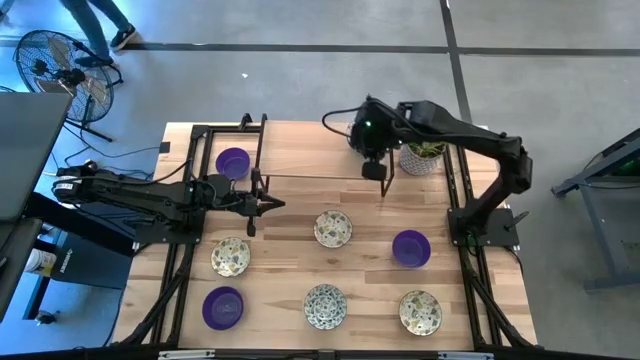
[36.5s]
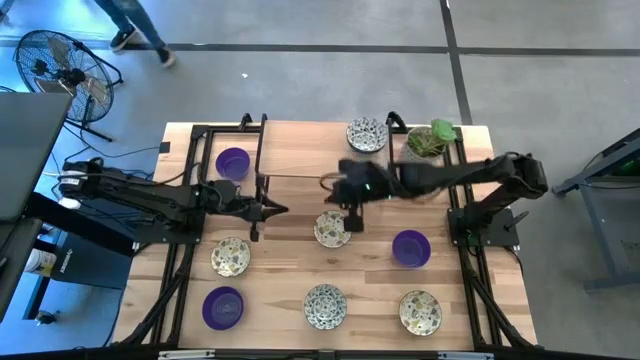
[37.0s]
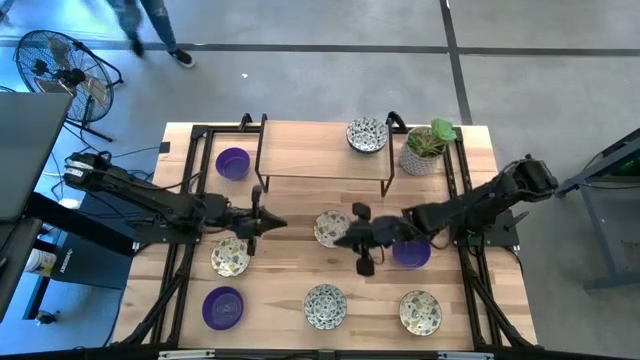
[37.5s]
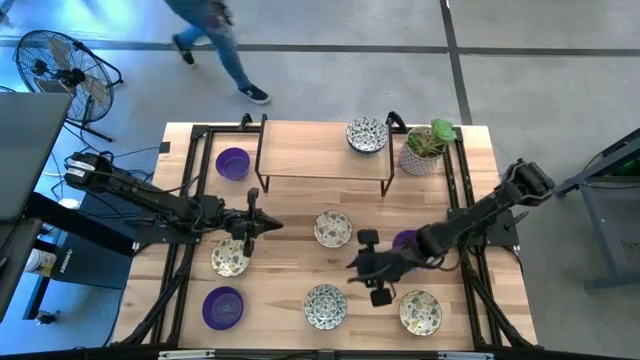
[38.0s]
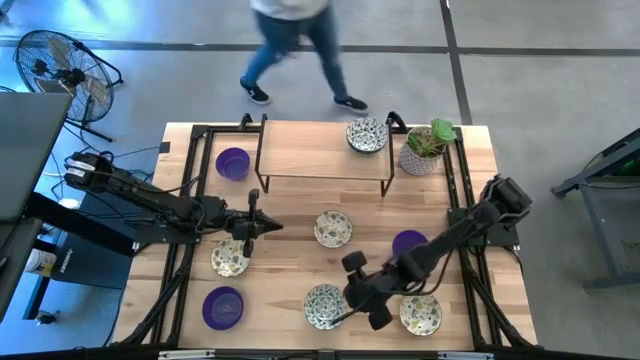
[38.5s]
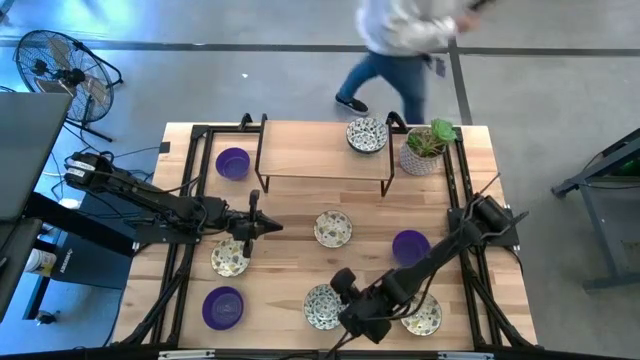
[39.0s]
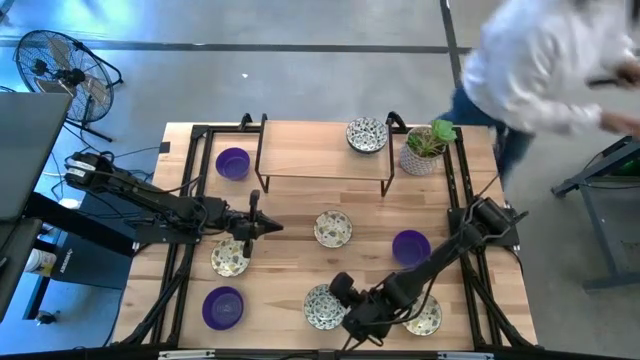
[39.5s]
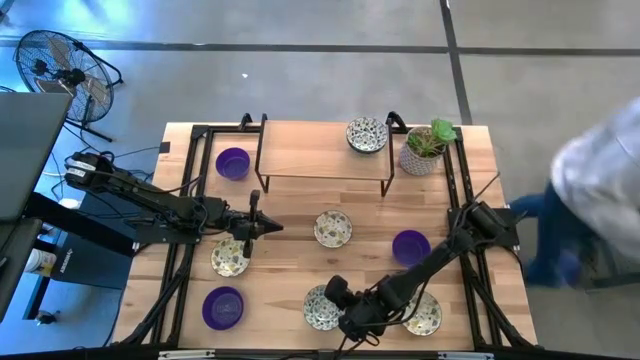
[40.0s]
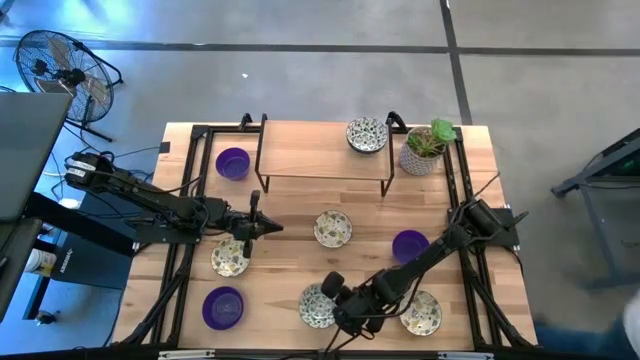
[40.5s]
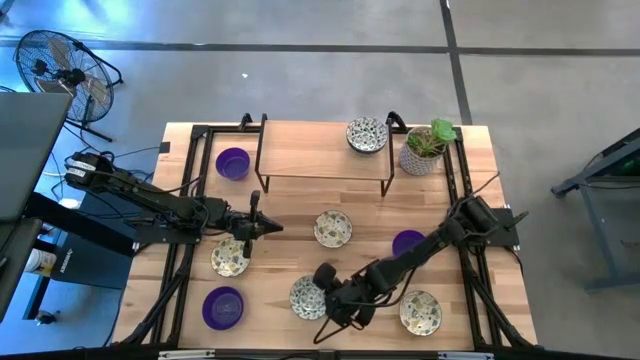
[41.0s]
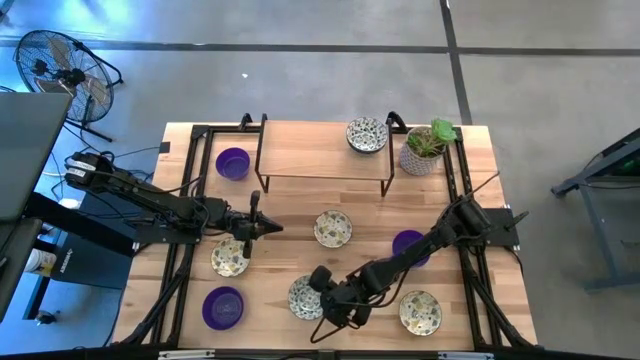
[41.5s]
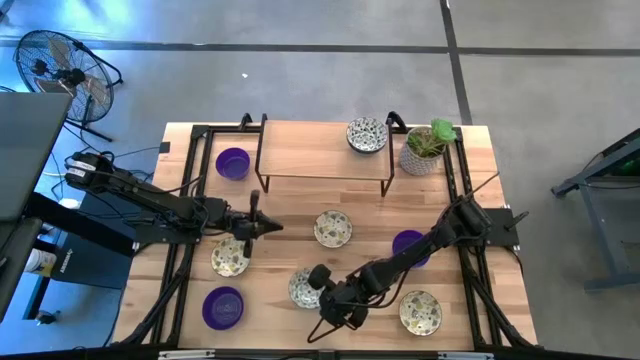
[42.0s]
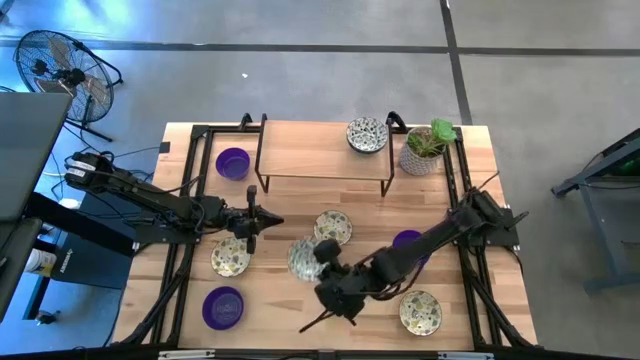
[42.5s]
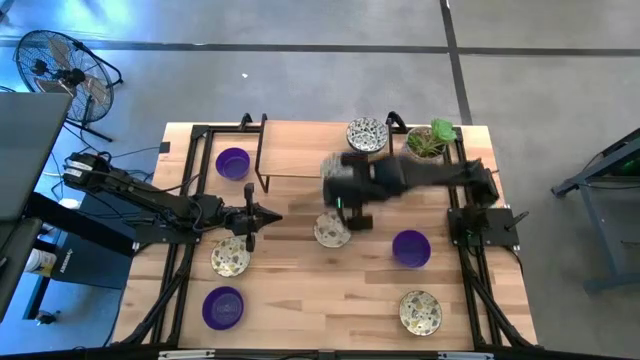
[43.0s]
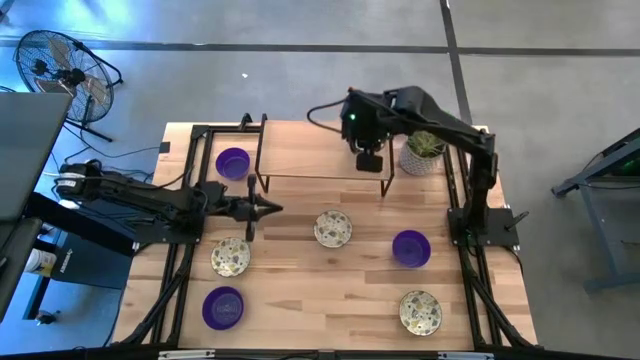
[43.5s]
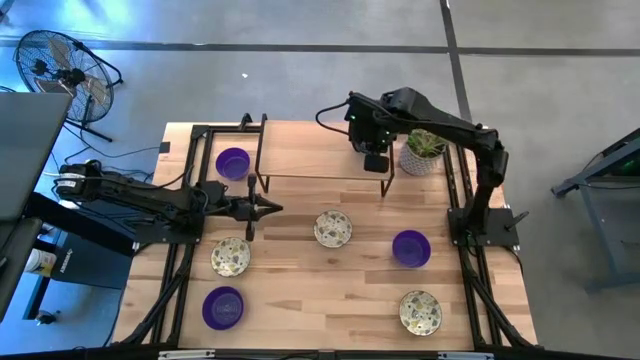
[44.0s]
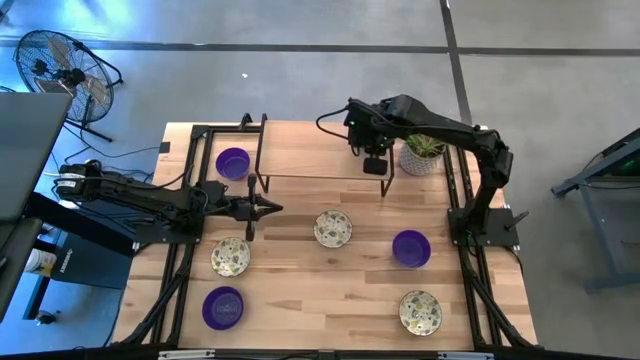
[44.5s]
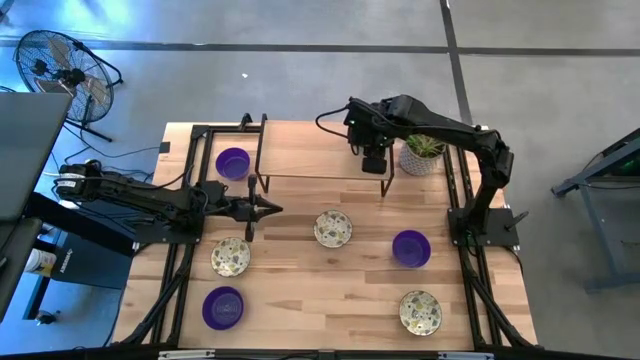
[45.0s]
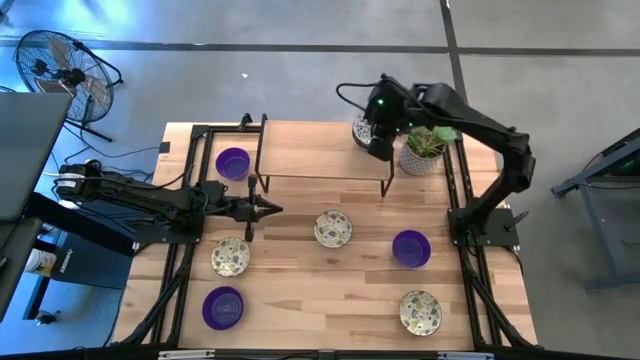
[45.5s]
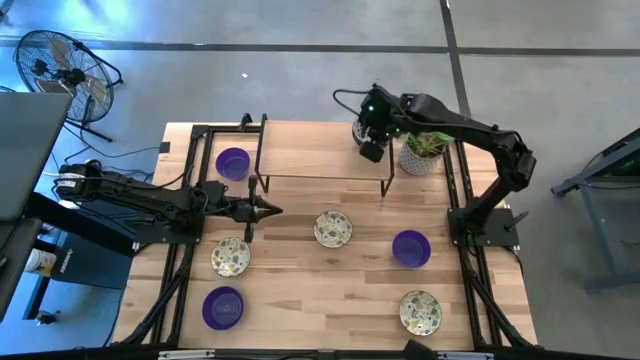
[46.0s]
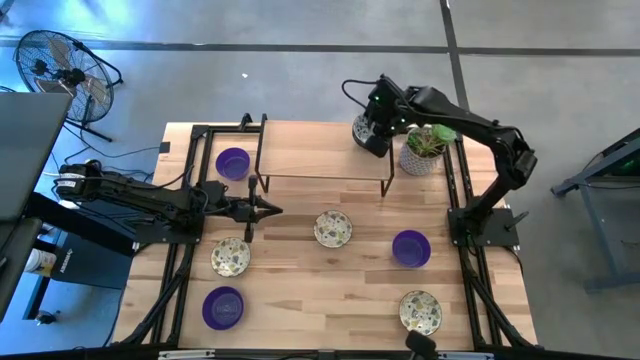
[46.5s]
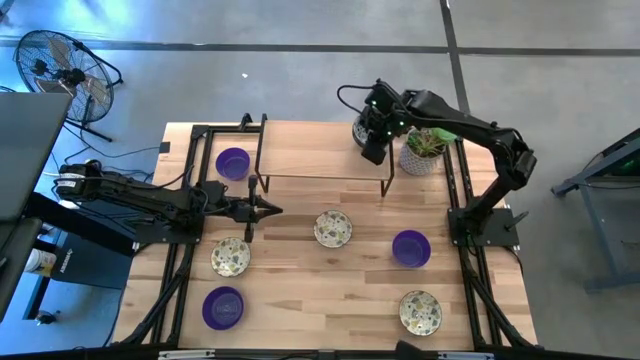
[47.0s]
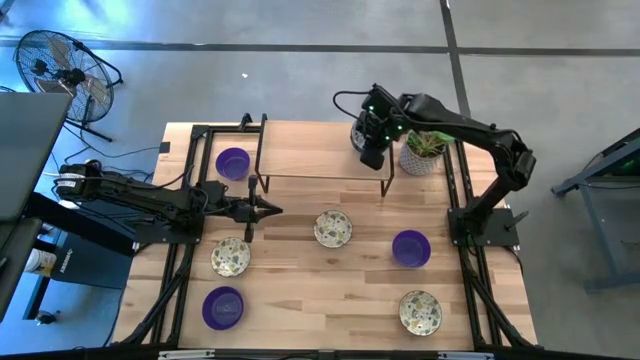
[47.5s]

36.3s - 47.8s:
Task: Pick & Place Mini bowls
Stack the blue patterned bowl on the blue bowl on the shelf

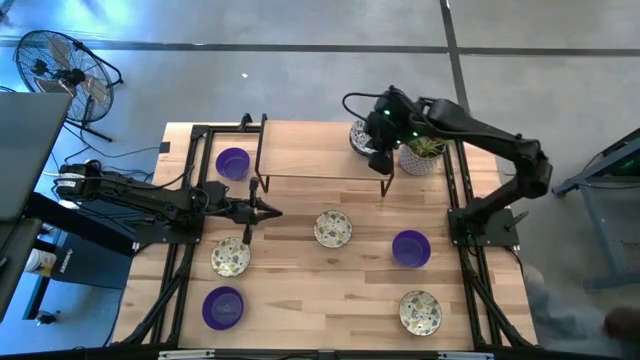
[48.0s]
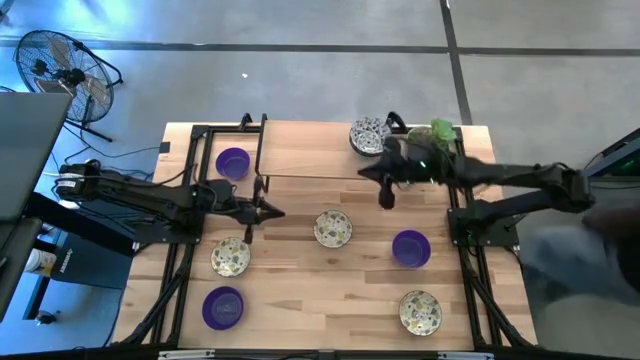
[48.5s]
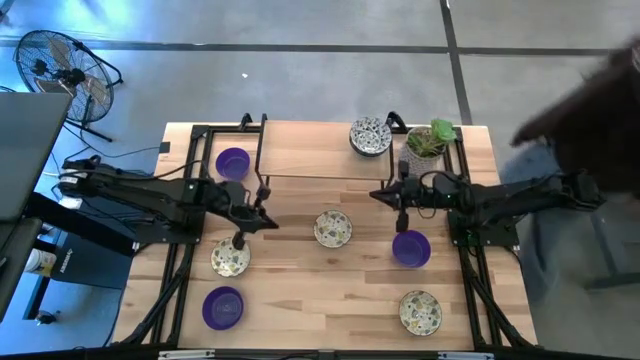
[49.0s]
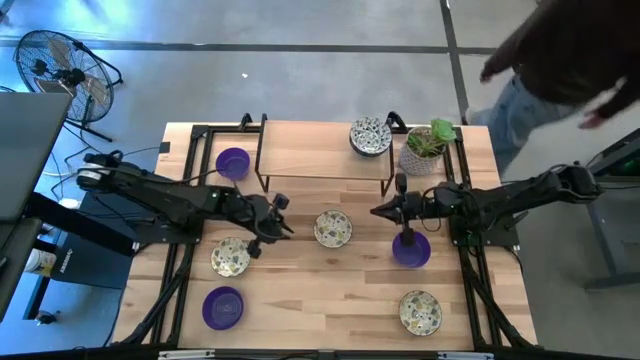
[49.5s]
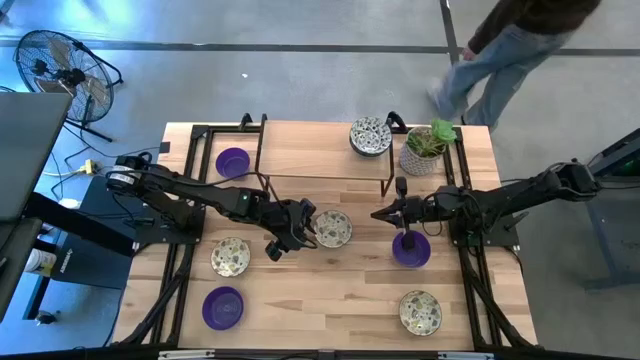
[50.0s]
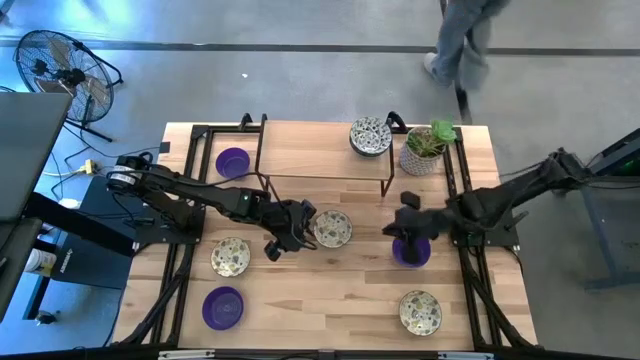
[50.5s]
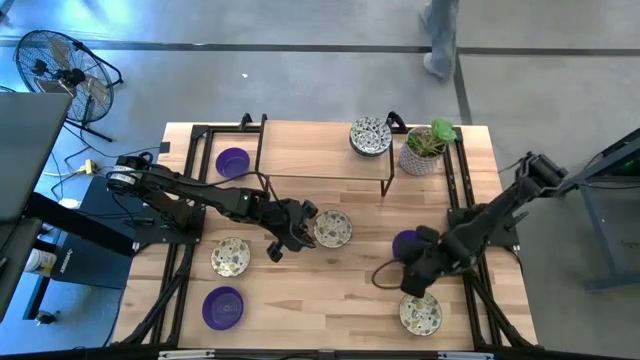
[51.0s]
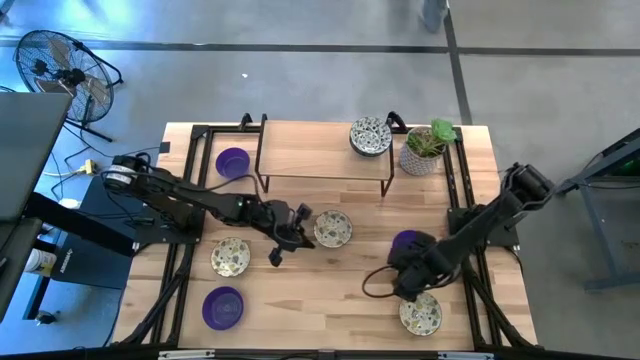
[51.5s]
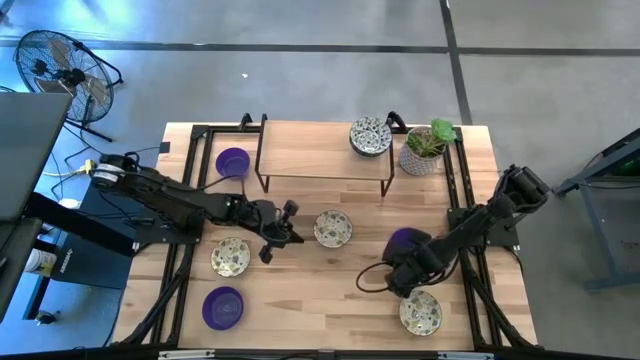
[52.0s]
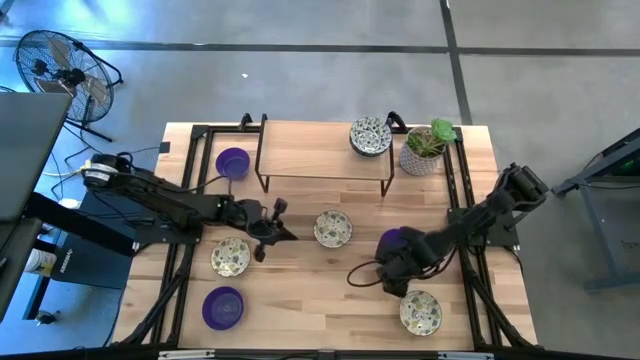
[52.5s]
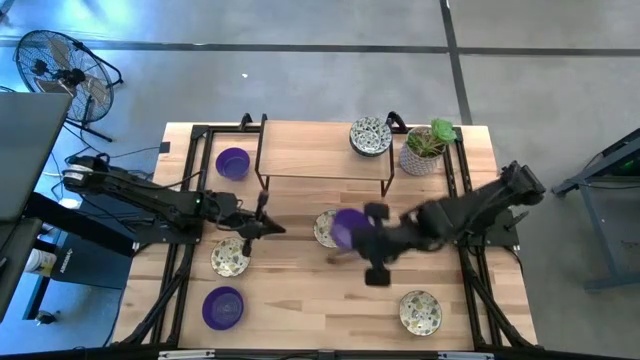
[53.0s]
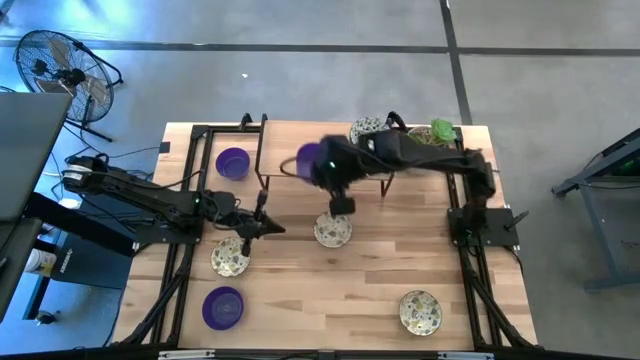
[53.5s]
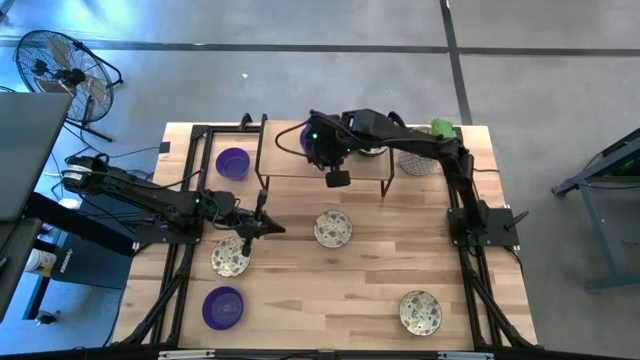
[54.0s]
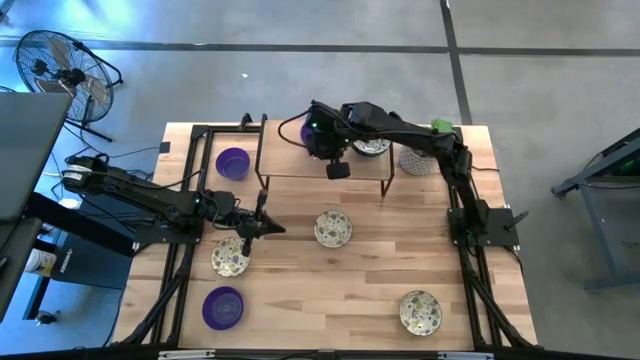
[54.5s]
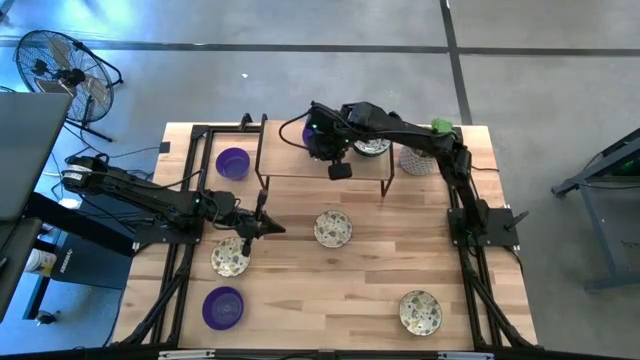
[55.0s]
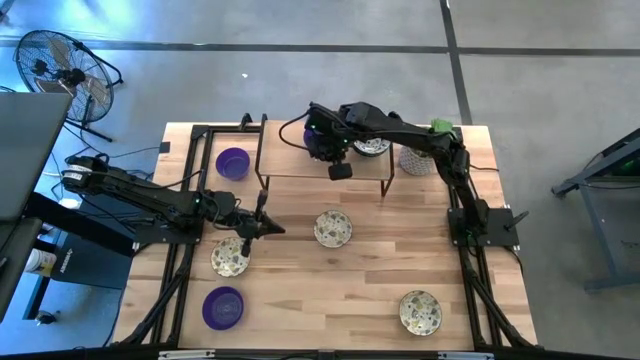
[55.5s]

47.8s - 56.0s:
Put the right violet bowl on the shelf

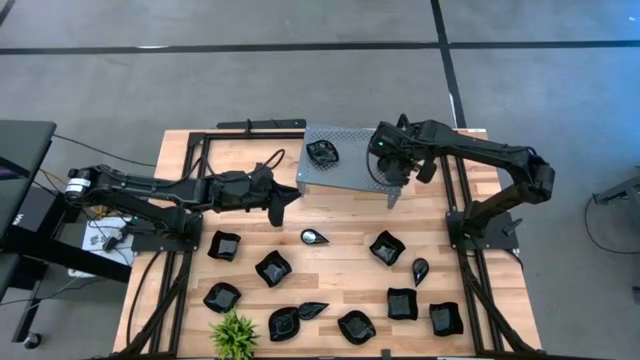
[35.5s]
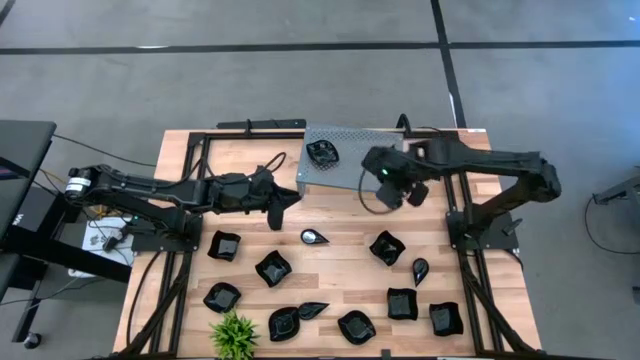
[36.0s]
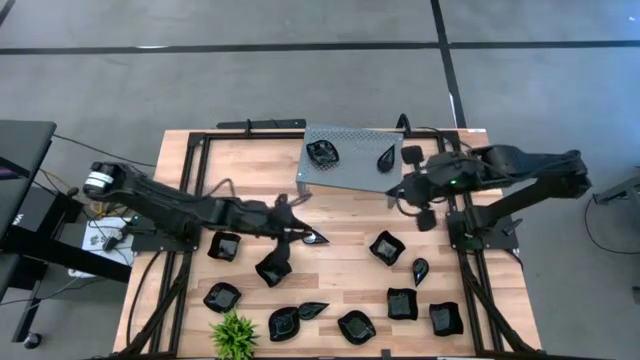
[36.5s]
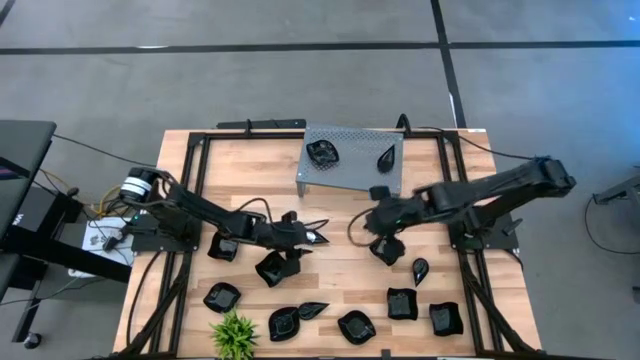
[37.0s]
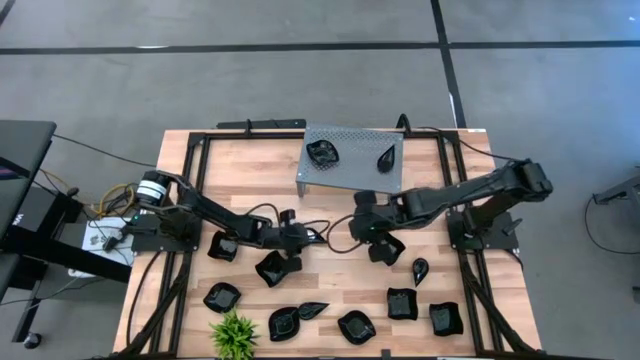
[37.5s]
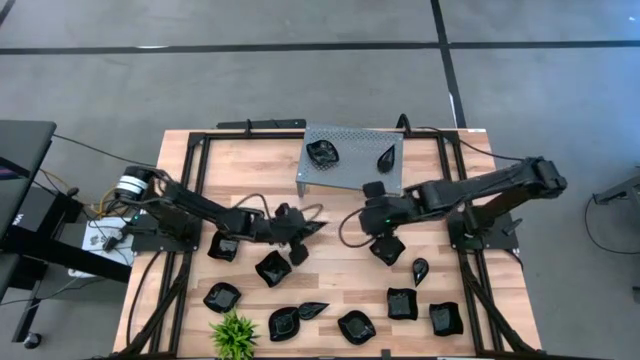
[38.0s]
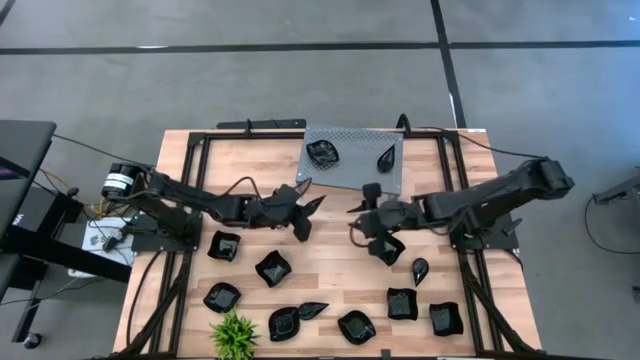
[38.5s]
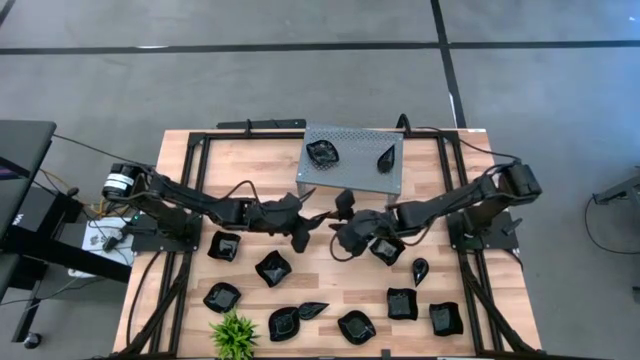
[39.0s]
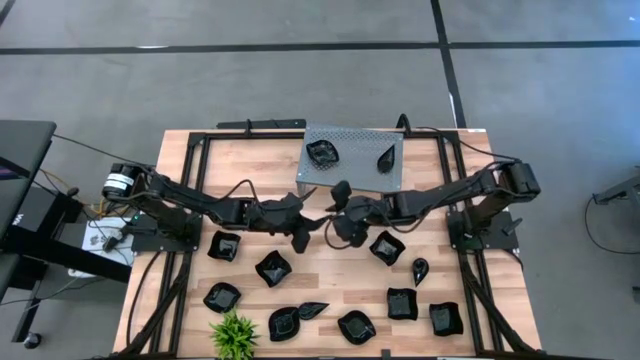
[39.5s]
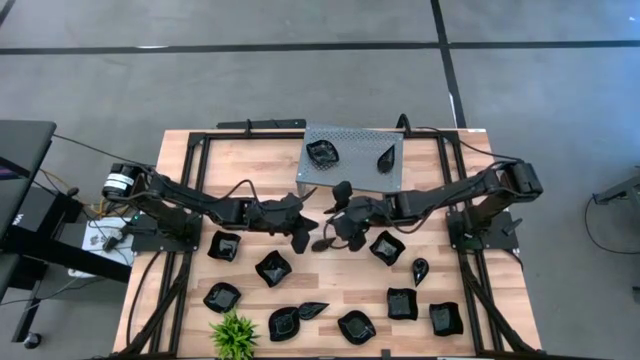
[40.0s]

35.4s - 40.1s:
Task: Pick & Place Mini shaped plates
Stack the black drop-shaped plate on the other drop-shaped plates on the shelf
